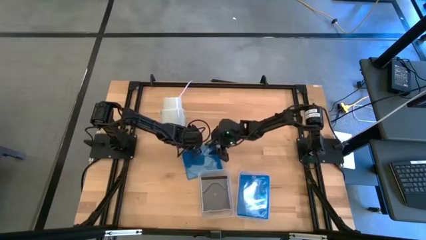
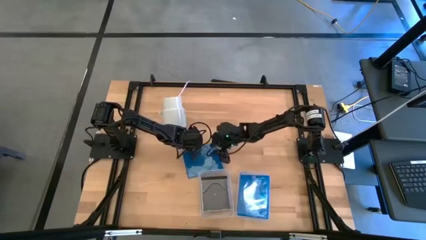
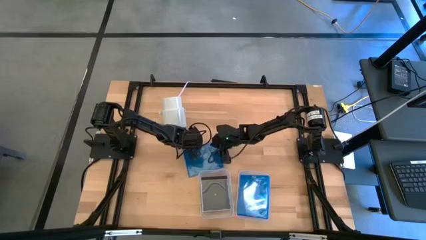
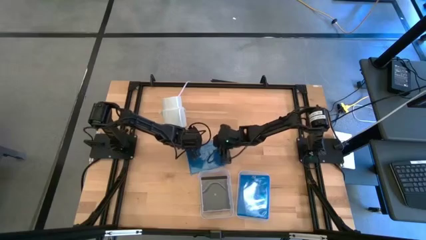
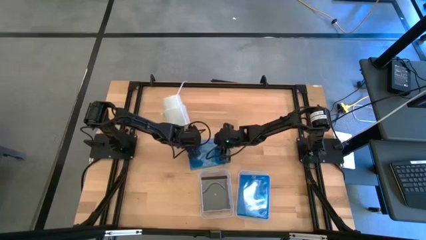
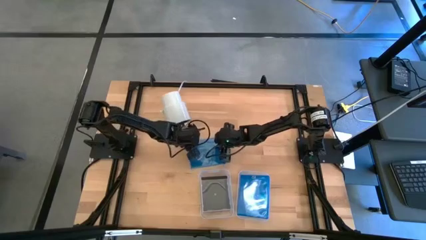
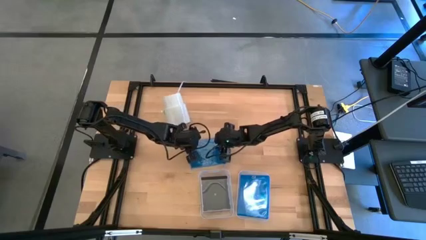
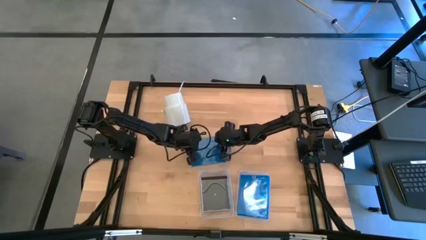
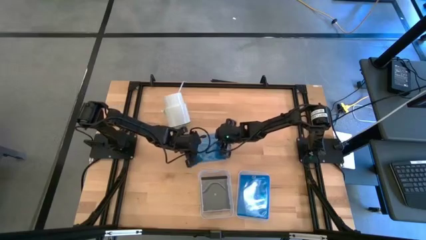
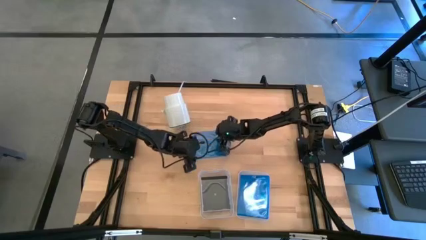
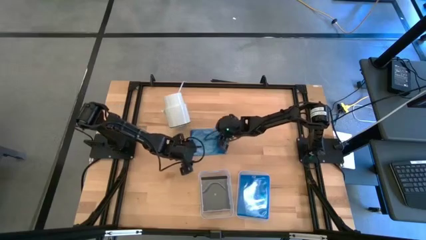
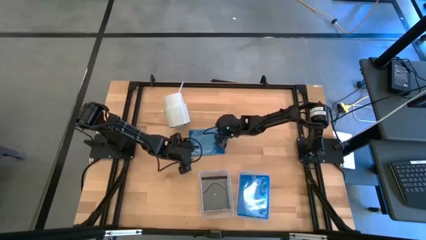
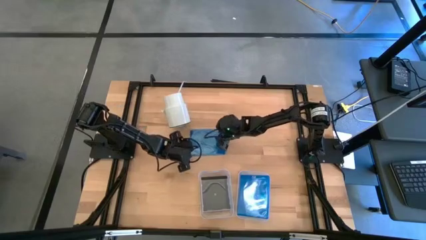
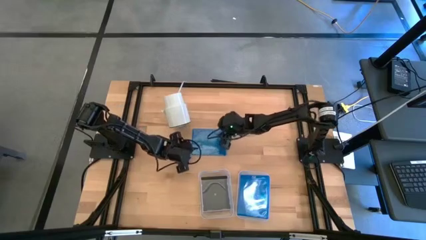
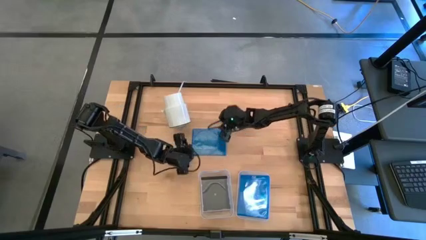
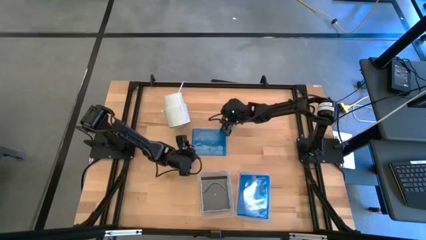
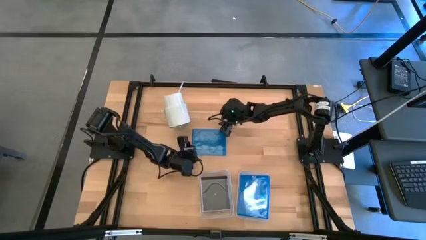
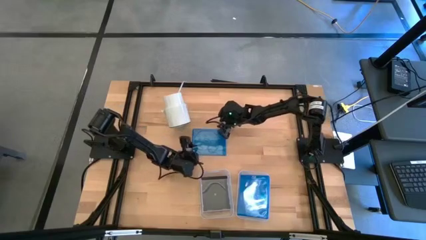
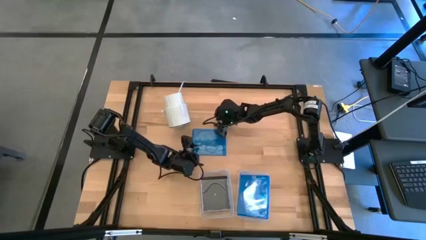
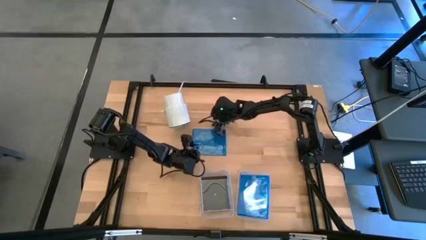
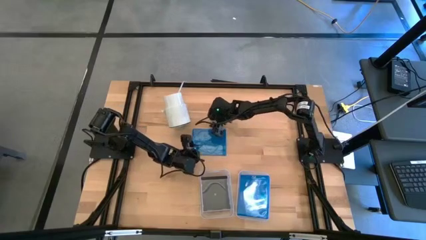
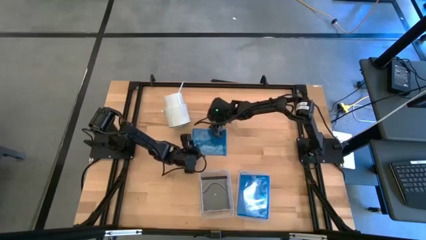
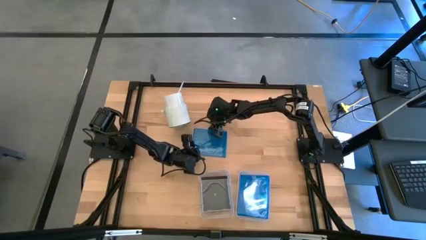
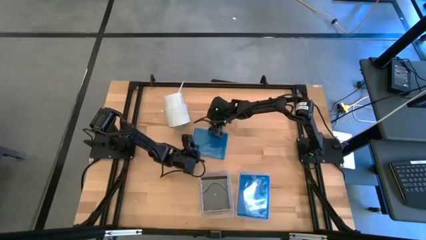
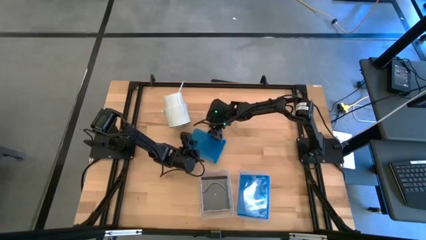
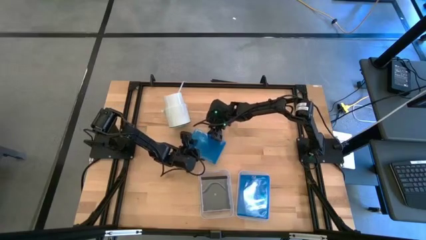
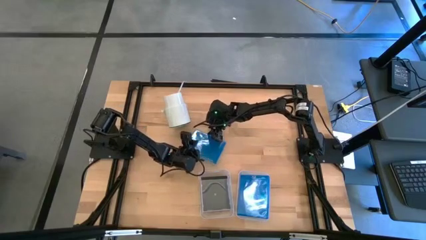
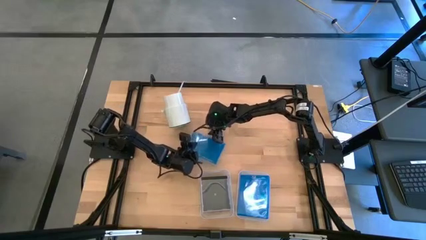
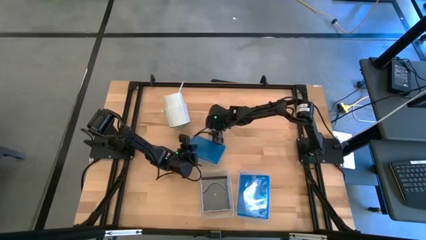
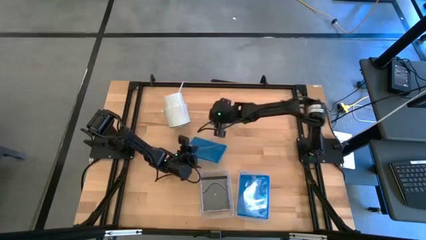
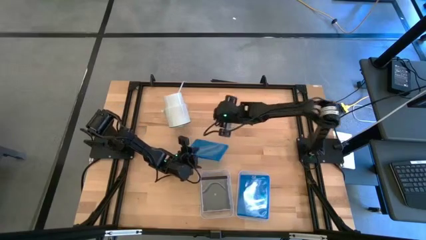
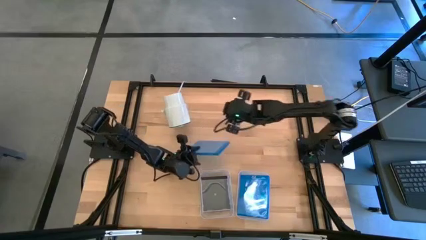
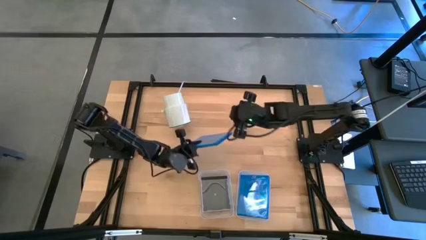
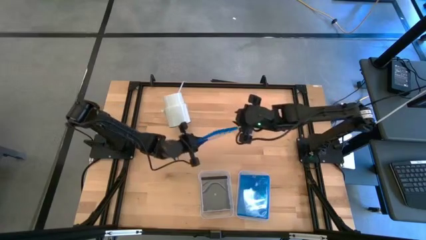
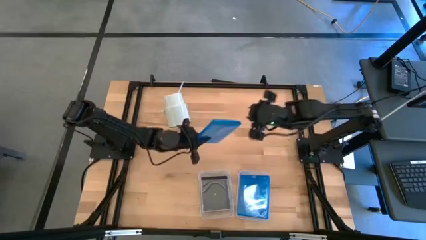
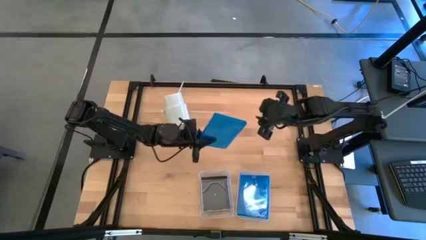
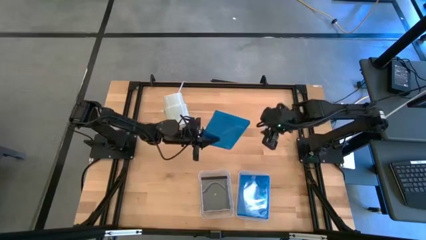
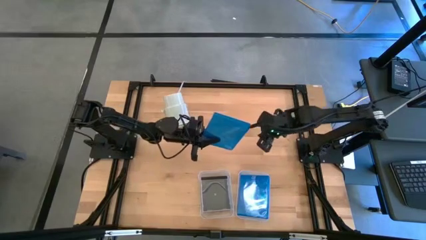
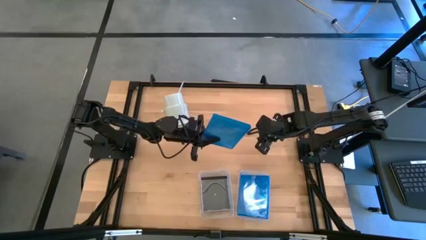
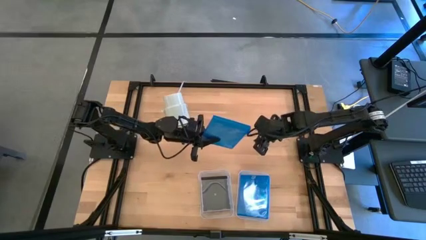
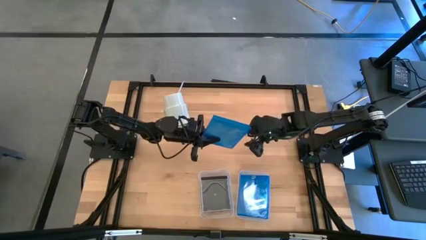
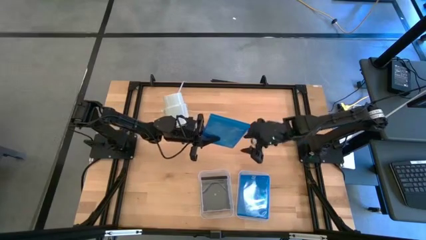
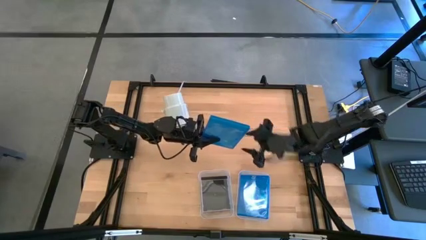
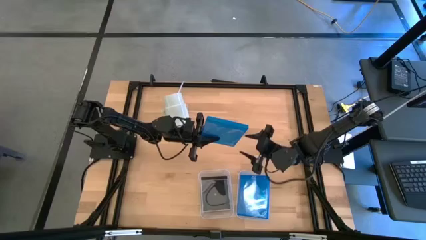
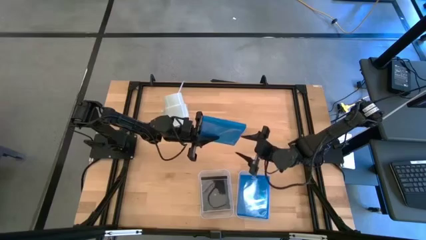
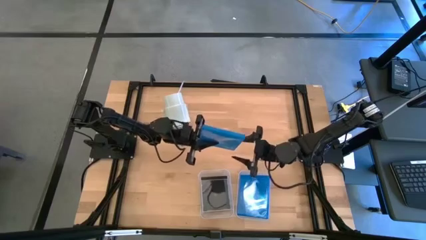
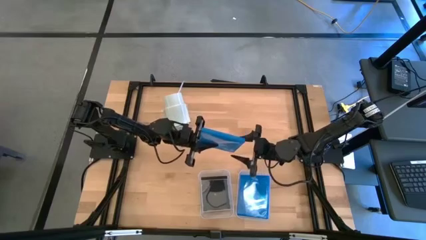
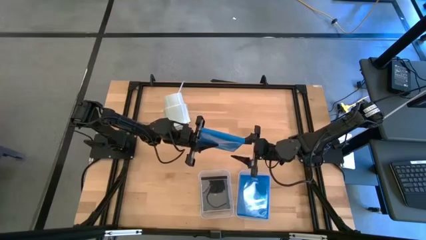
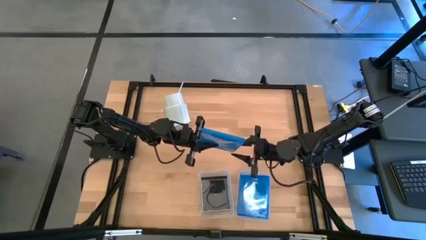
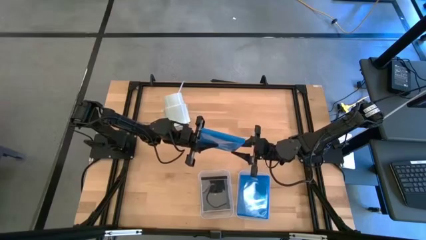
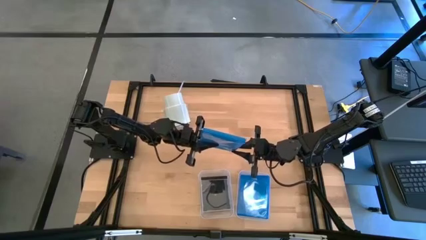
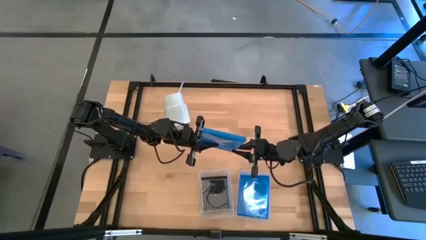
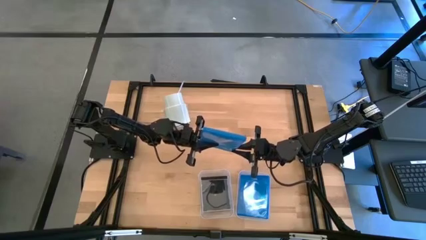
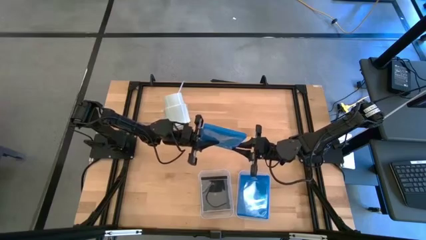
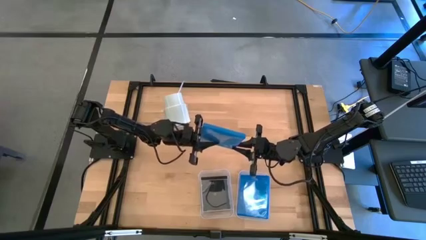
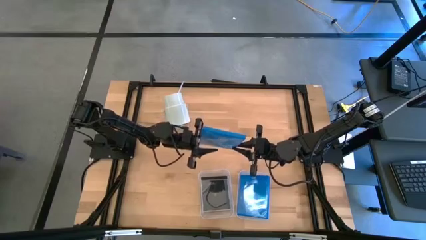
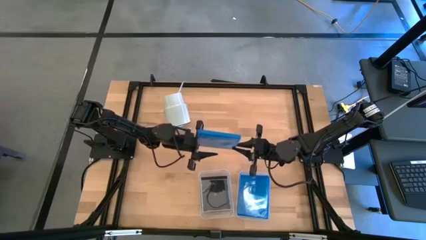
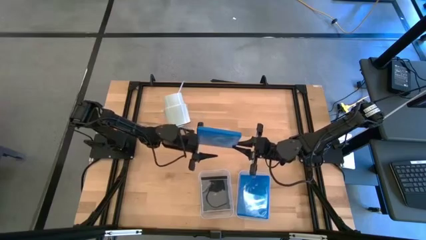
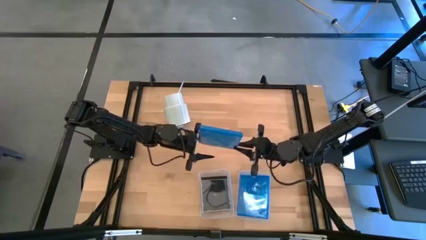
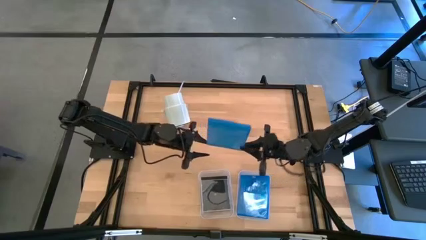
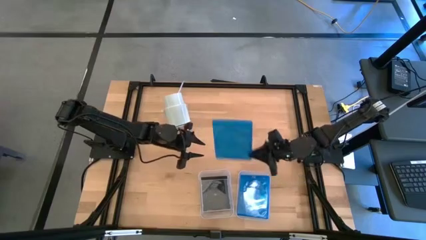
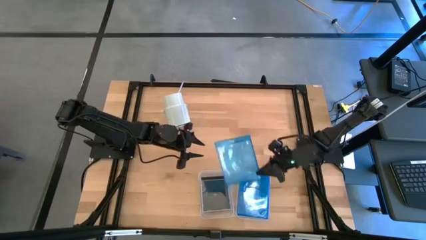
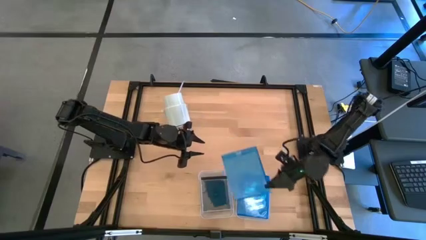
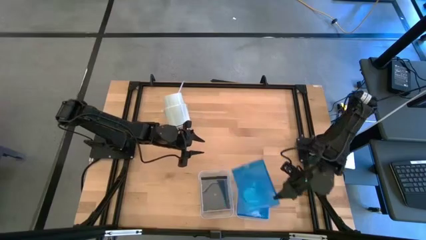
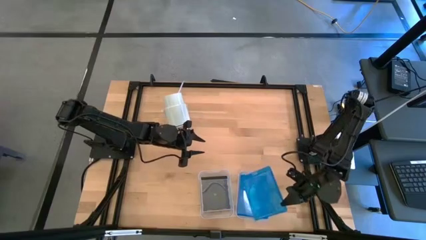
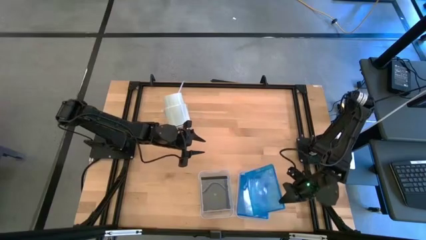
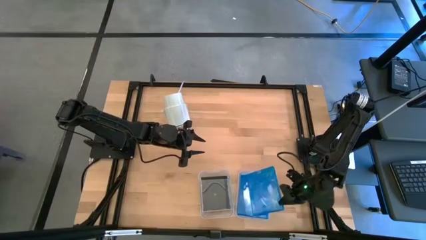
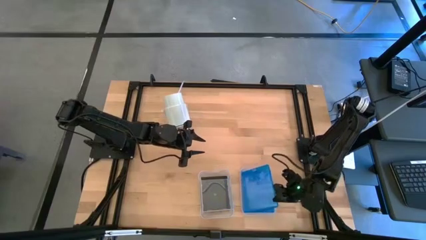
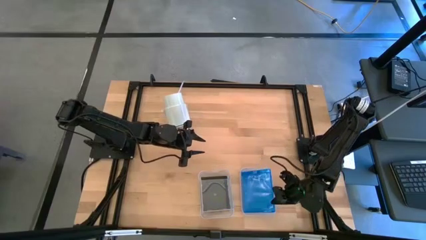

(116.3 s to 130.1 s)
Task: Pick & place jewel cases by type
Put the blue cd case into the right transparent bin
